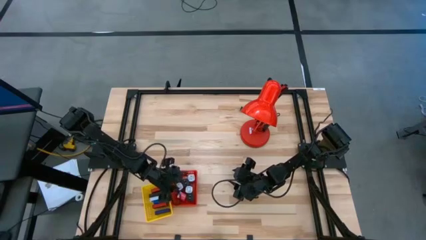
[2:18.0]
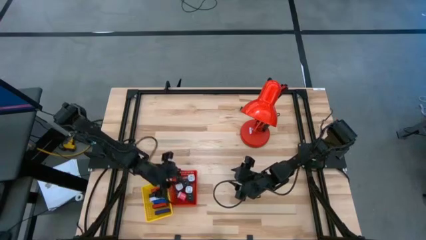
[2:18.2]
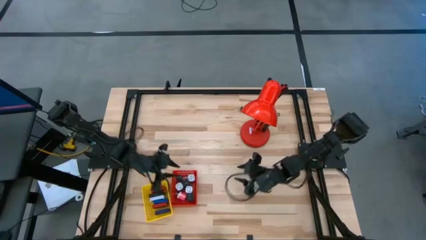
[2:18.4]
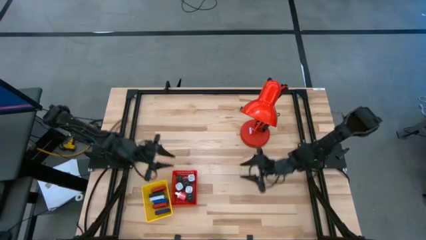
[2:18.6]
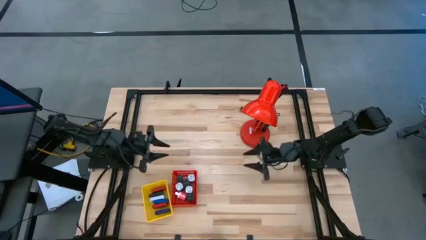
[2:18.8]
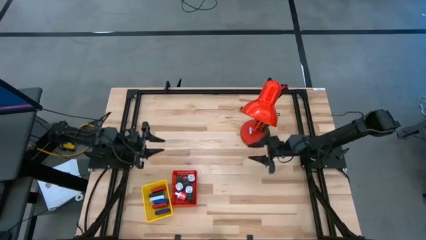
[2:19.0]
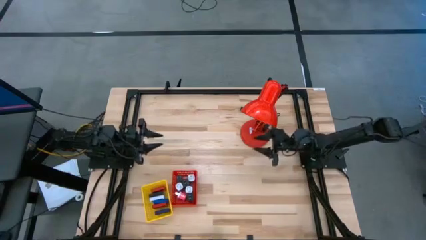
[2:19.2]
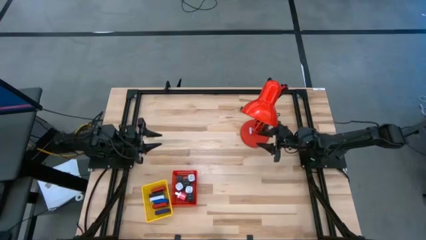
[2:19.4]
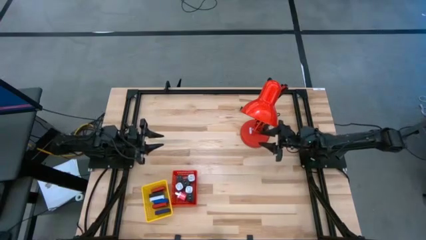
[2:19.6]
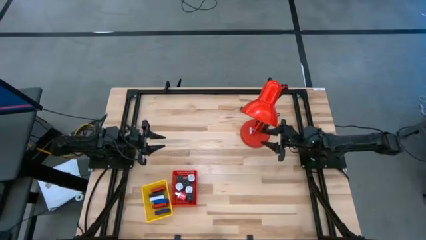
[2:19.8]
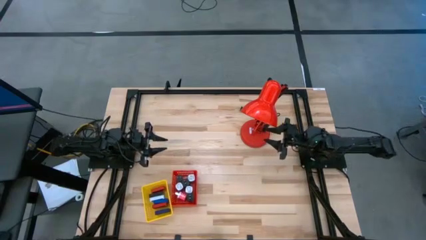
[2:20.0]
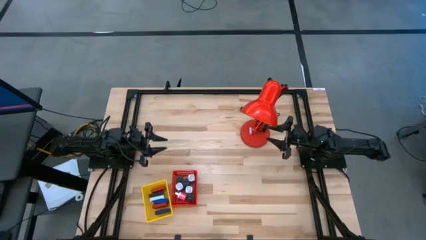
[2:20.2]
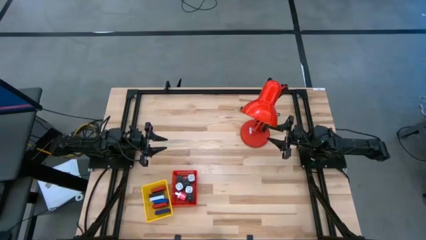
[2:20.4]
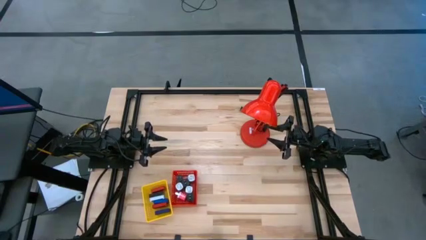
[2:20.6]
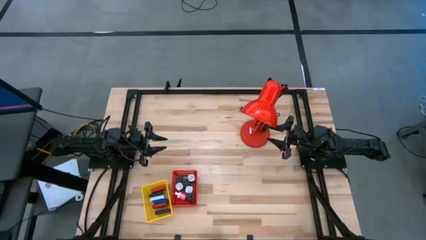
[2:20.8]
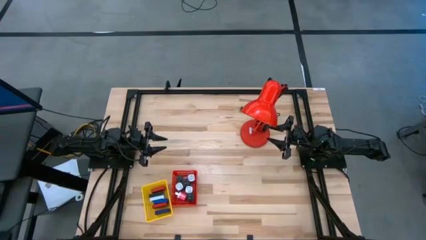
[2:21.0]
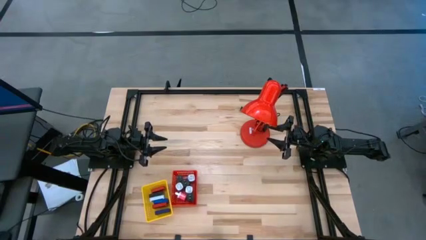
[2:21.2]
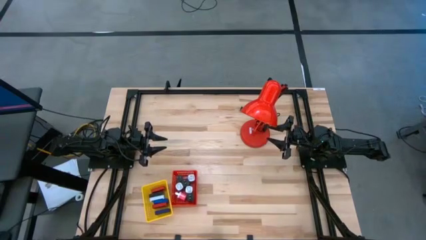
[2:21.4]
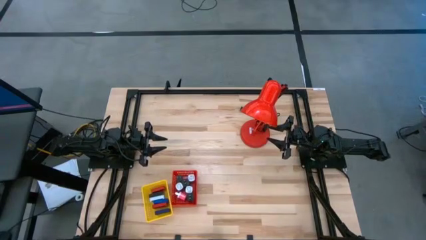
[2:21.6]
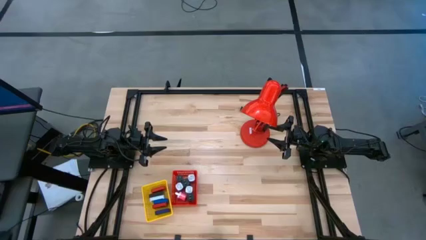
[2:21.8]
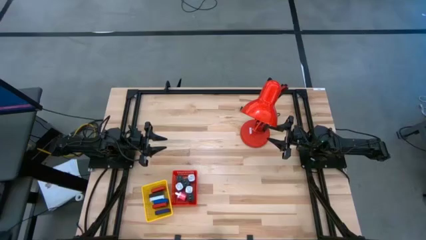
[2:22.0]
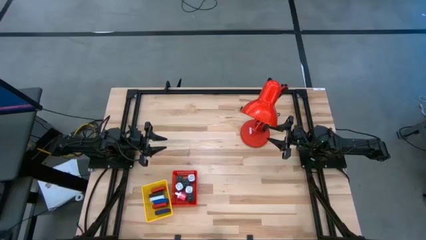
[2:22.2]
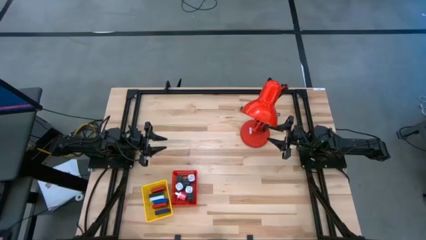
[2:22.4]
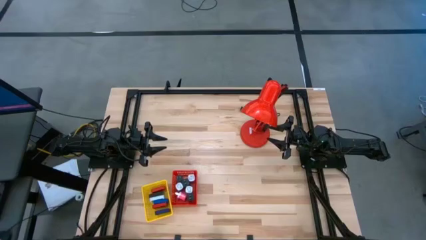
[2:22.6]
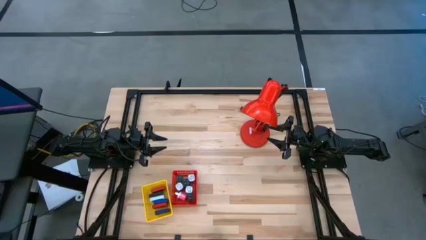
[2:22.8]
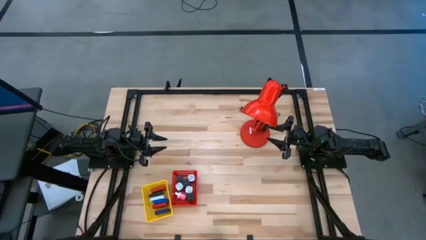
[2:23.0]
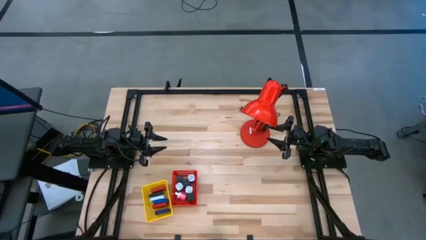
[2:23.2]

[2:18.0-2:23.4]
Task: Pick & Place Office items
Return to Home Position

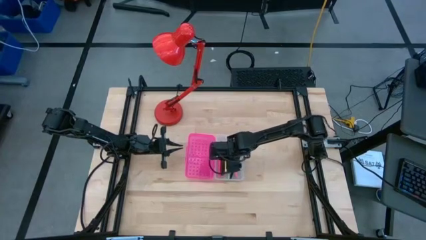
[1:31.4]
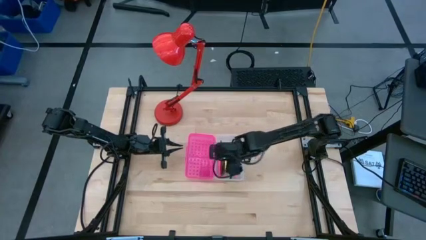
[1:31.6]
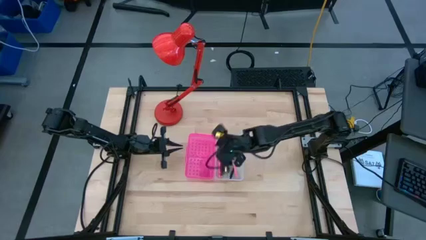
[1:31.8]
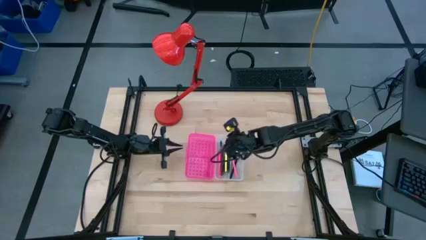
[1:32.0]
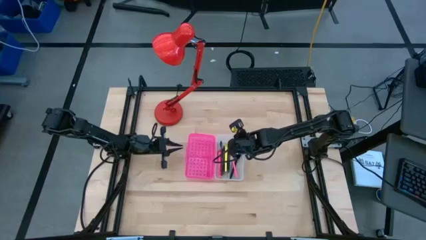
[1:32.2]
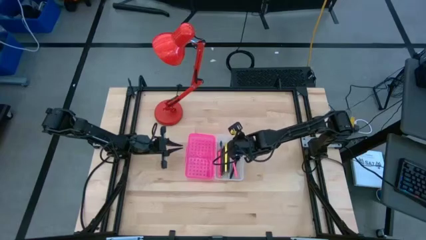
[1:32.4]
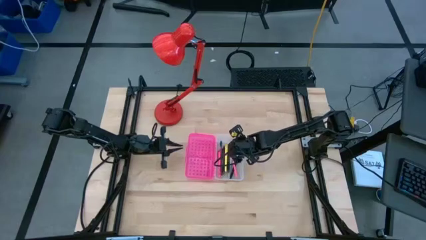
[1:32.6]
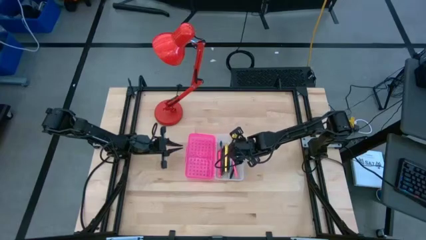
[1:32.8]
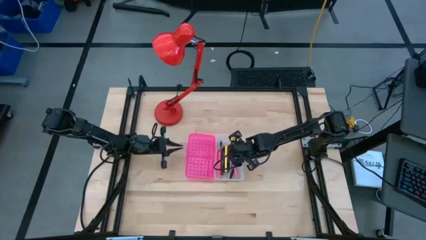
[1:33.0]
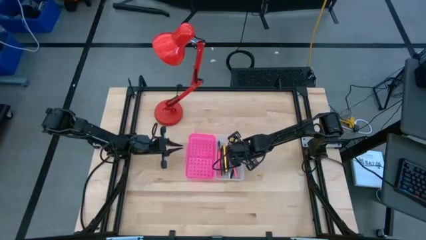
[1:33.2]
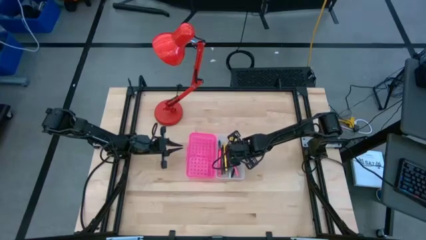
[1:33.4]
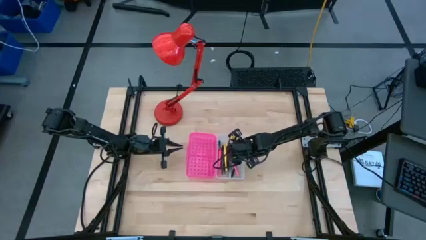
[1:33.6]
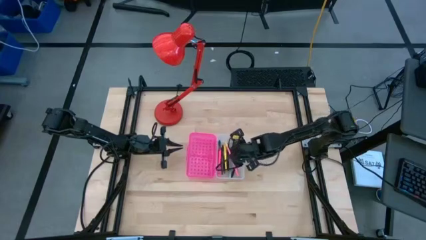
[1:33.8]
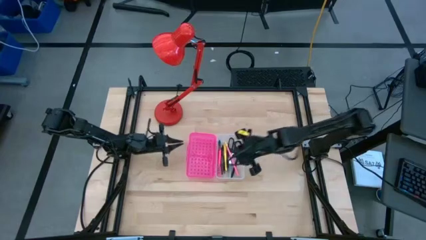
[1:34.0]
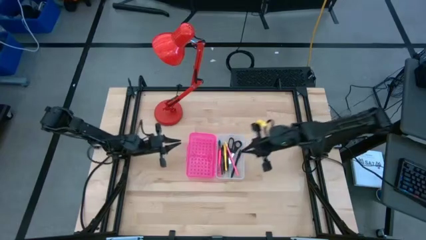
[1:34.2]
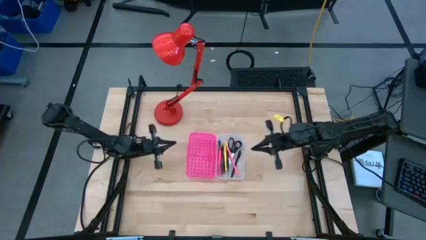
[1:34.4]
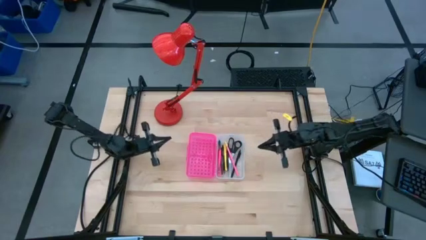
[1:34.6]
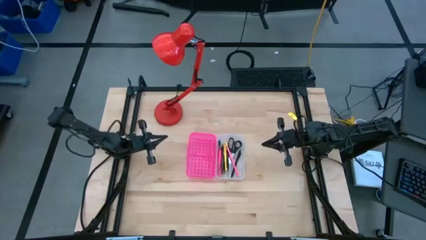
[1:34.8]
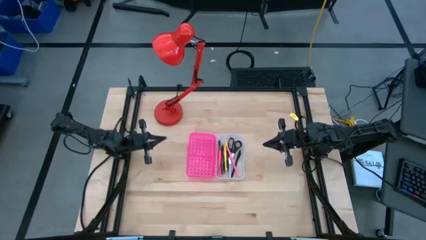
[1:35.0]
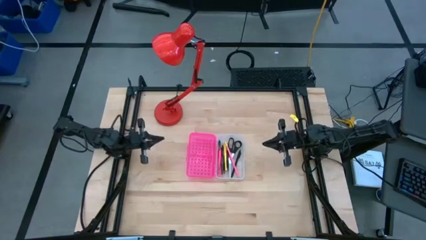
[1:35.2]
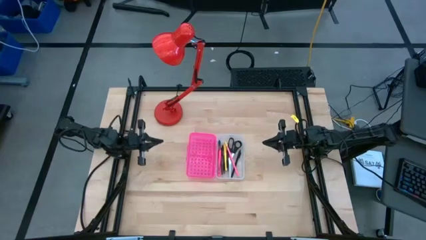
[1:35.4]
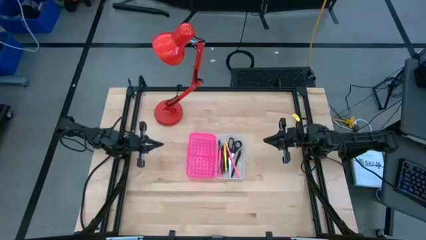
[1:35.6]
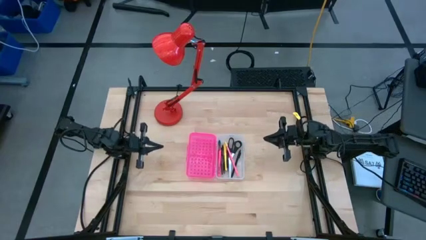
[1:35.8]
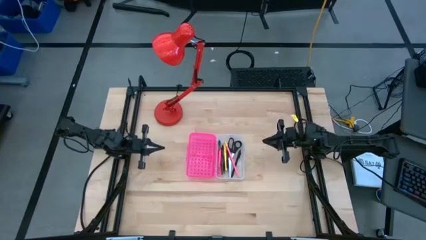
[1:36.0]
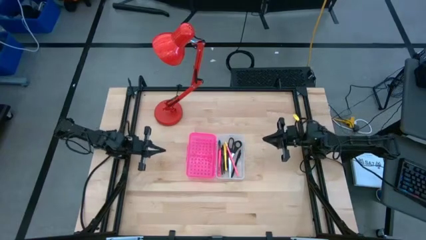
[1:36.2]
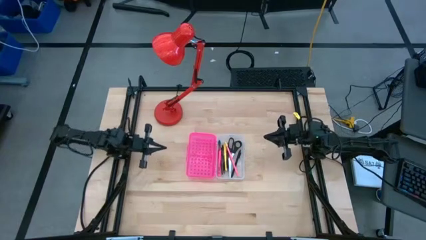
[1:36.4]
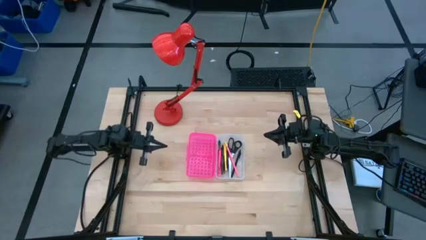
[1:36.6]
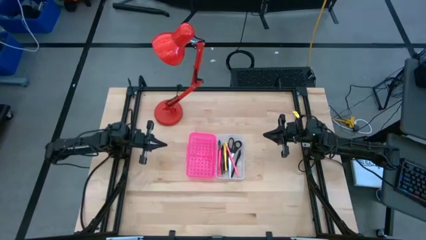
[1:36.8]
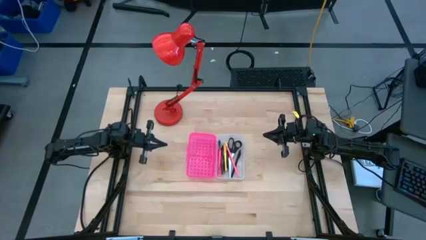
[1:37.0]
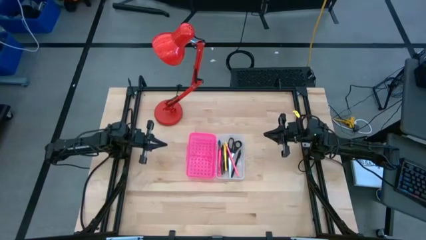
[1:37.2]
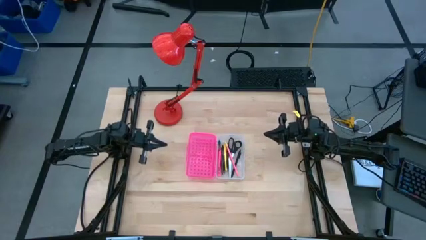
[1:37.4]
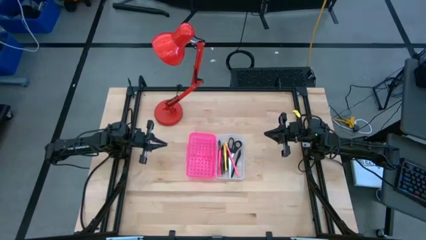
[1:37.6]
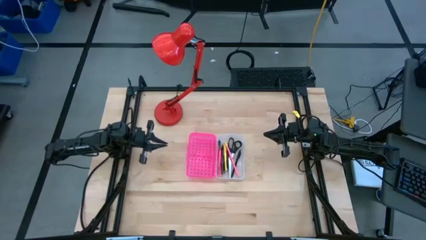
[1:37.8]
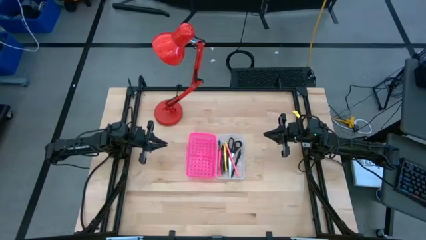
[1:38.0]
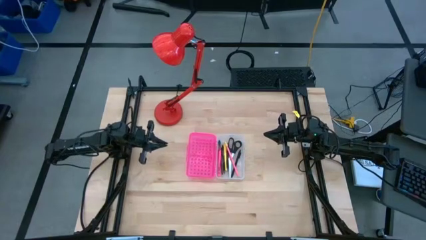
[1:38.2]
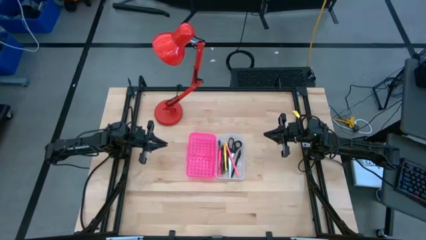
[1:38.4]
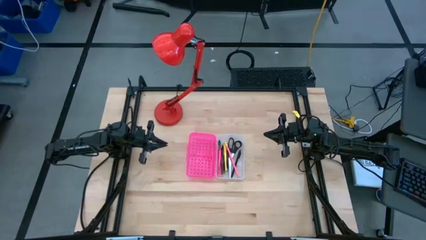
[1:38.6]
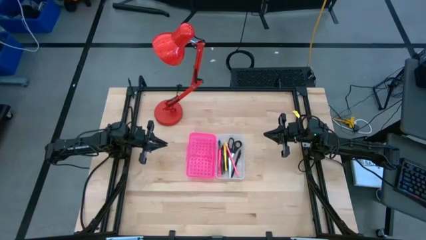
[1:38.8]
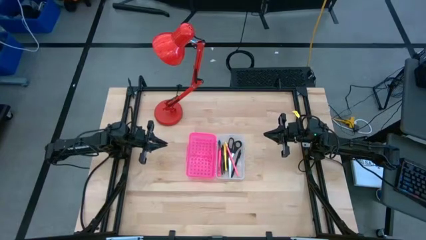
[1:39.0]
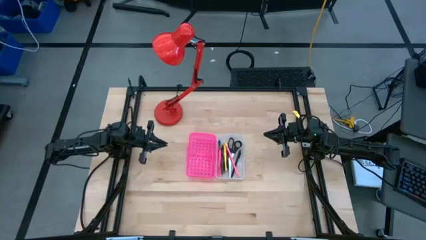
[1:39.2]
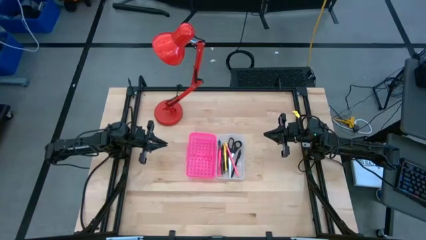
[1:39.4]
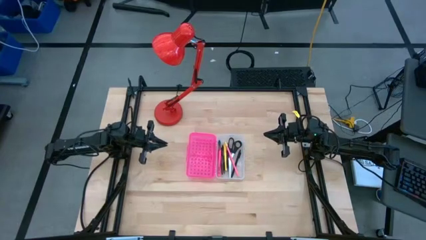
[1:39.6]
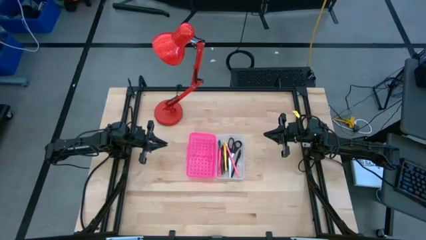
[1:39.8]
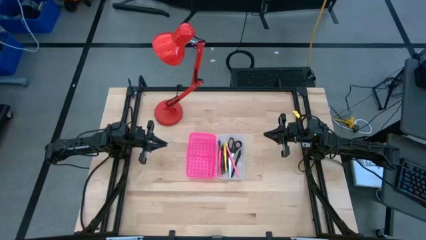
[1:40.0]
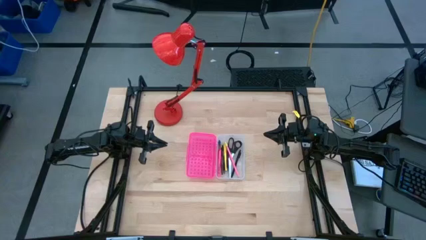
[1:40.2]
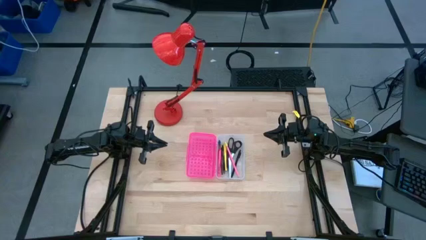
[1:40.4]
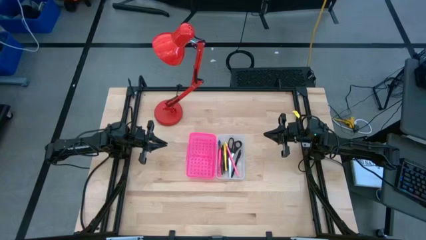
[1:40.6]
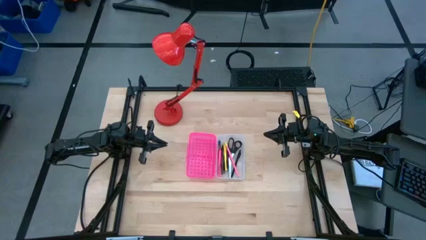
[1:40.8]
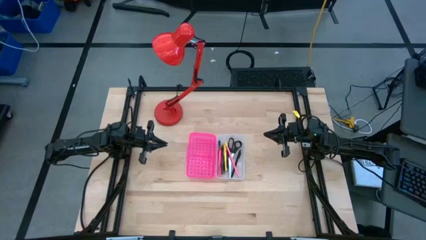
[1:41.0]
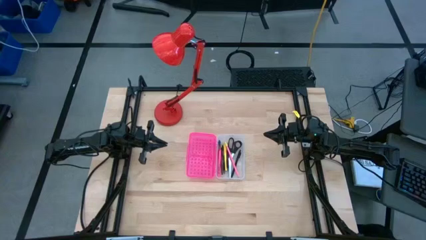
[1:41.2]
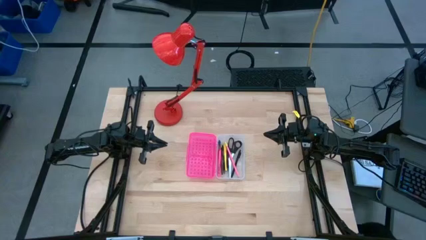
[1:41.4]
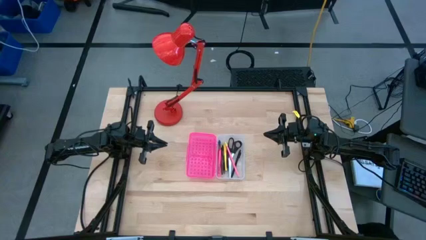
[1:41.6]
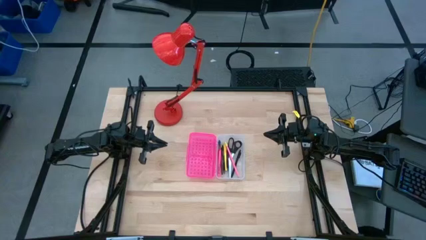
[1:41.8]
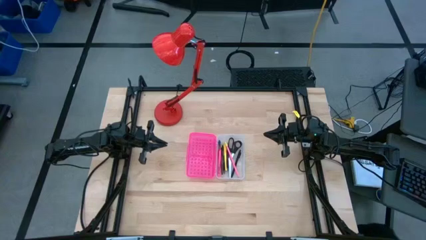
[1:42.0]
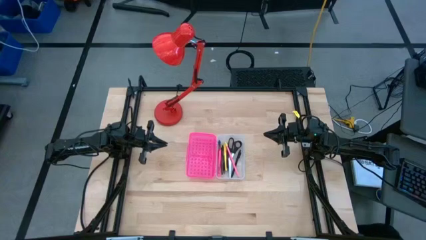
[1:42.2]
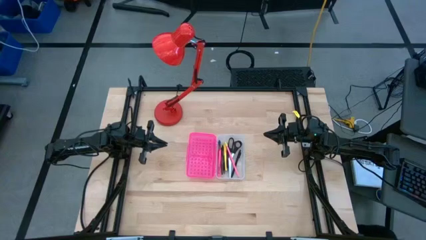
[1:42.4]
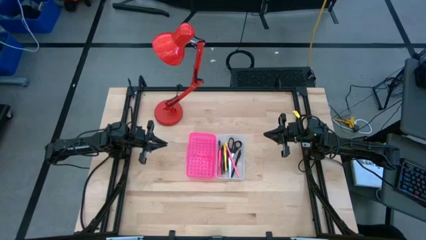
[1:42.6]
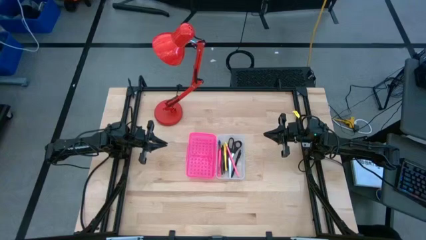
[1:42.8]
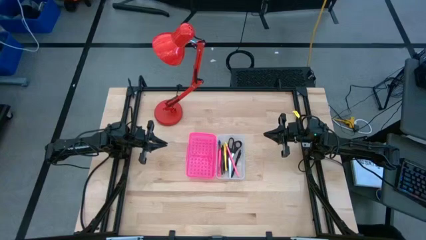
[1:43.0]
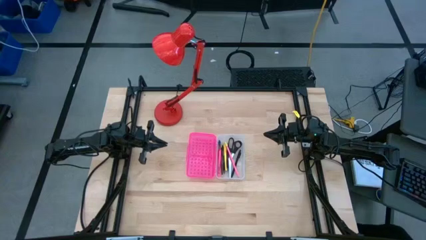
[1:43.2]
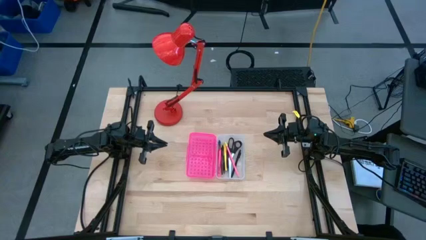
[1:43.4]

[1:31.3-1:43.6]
Task: Pick & place school supplies into a supply box
Return to Home Position
